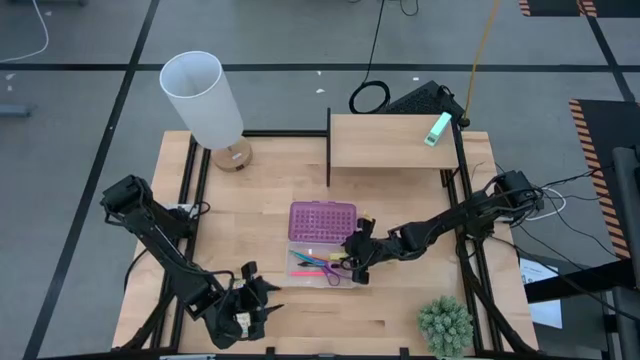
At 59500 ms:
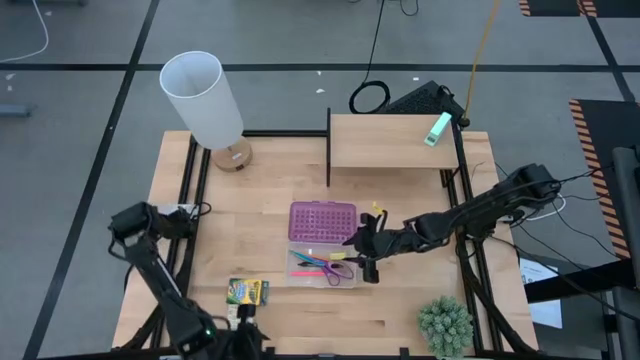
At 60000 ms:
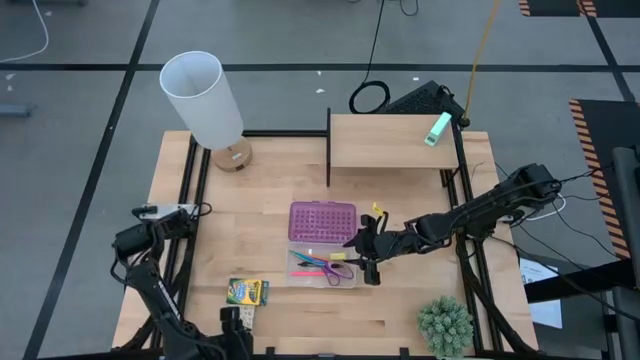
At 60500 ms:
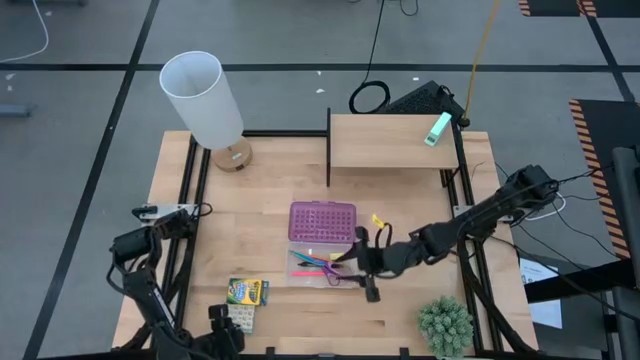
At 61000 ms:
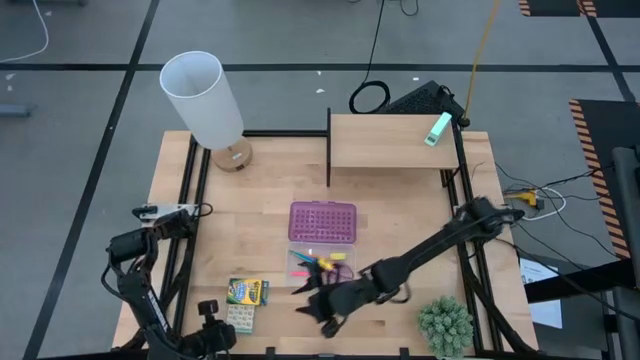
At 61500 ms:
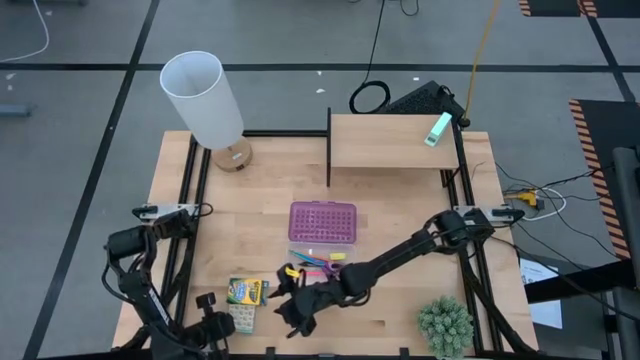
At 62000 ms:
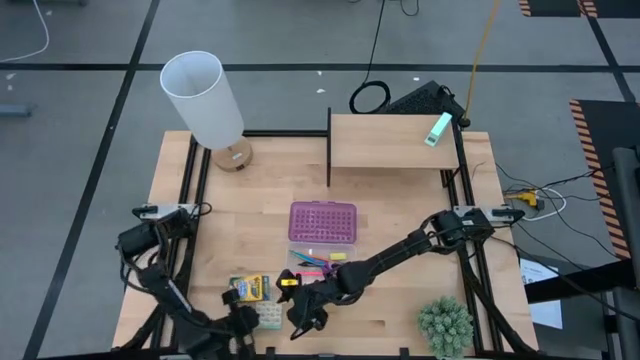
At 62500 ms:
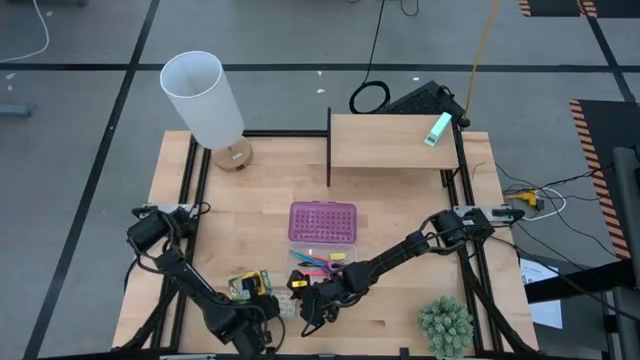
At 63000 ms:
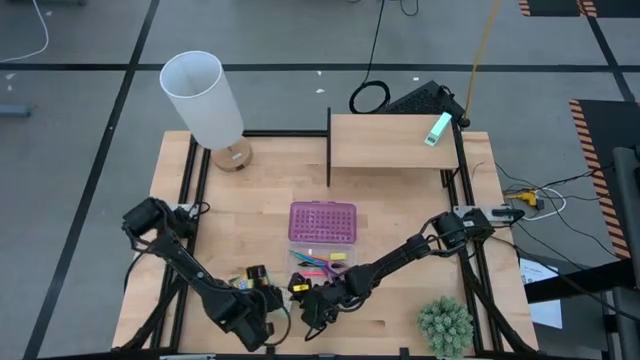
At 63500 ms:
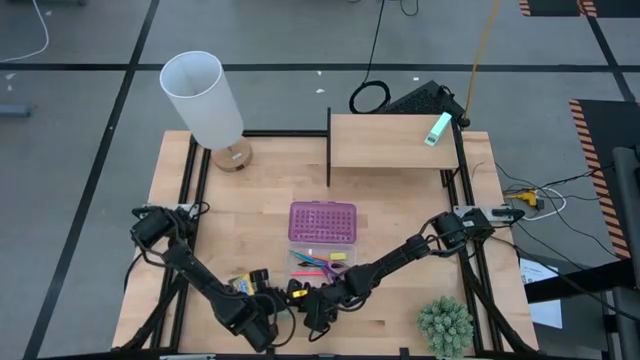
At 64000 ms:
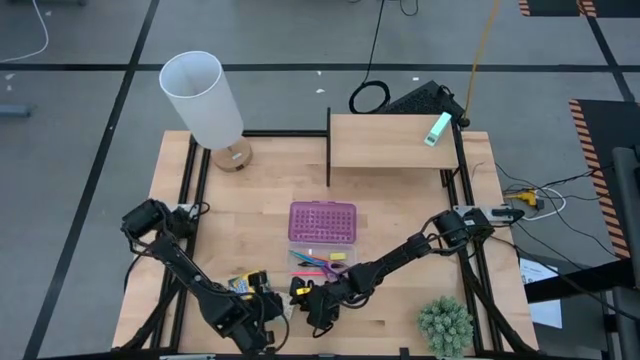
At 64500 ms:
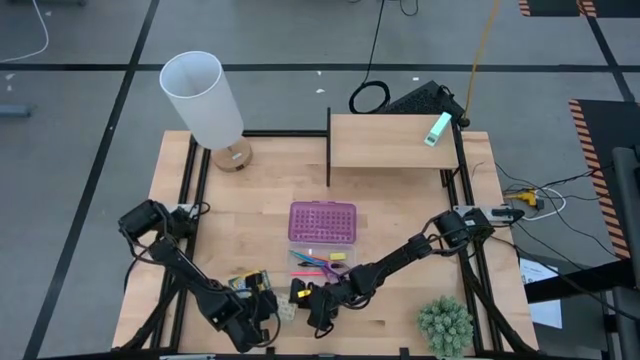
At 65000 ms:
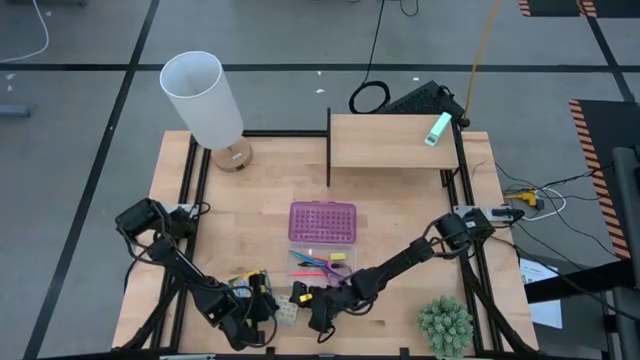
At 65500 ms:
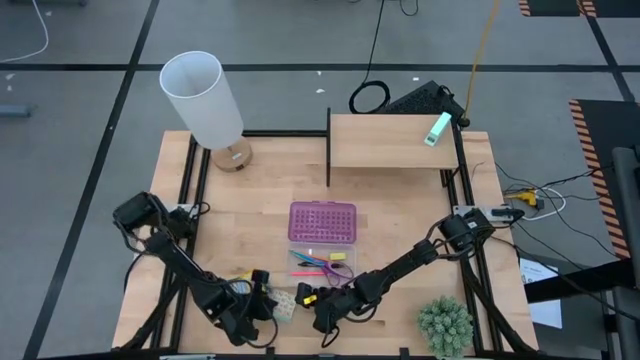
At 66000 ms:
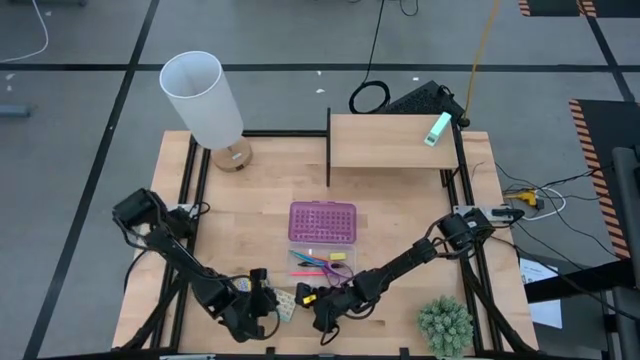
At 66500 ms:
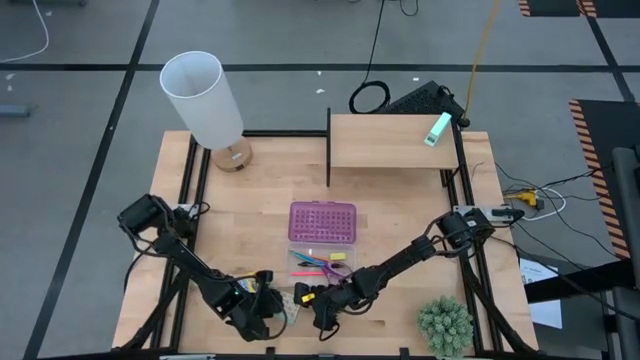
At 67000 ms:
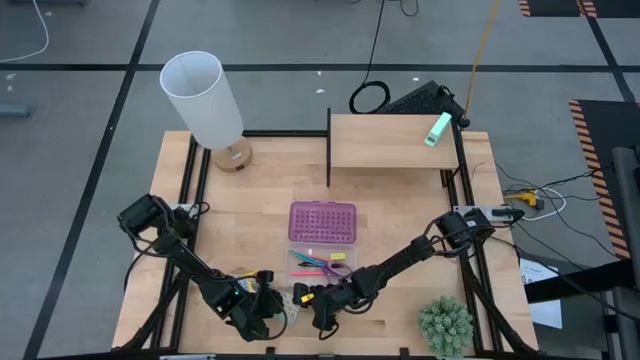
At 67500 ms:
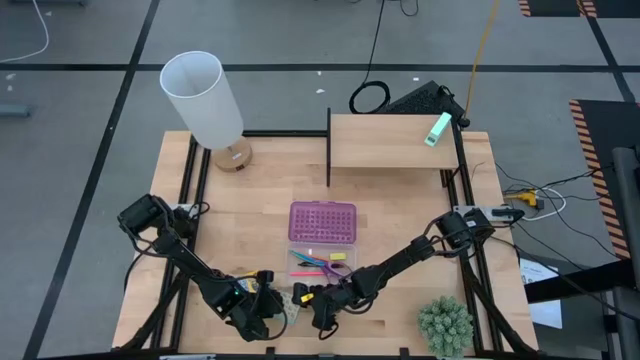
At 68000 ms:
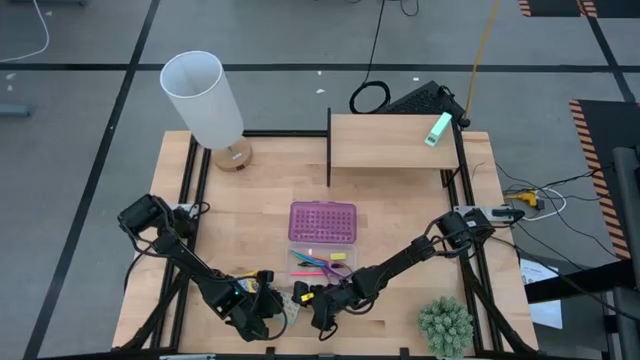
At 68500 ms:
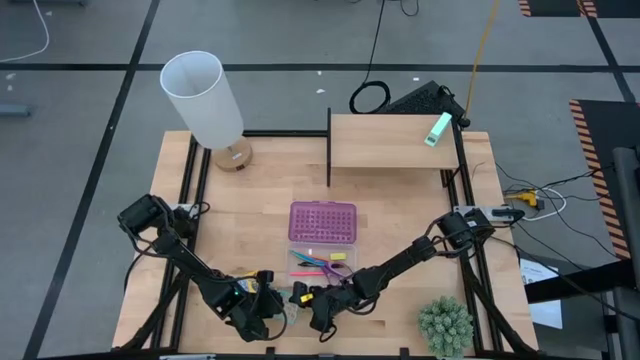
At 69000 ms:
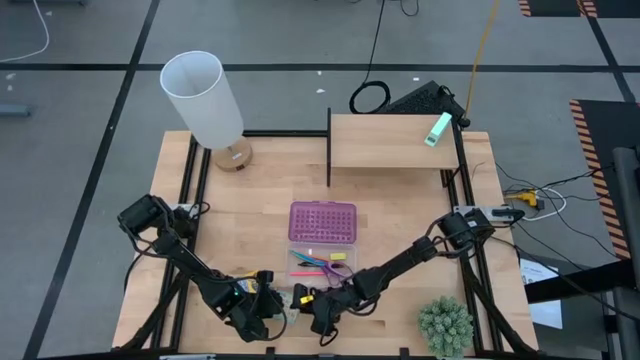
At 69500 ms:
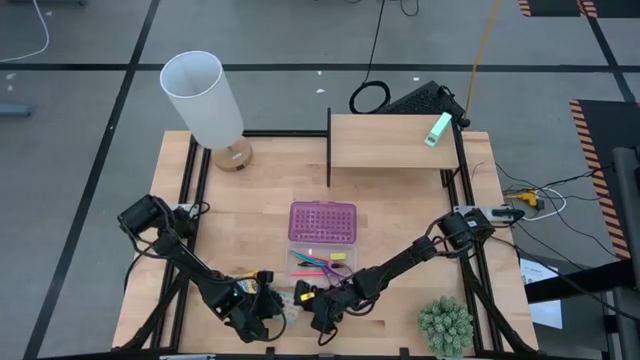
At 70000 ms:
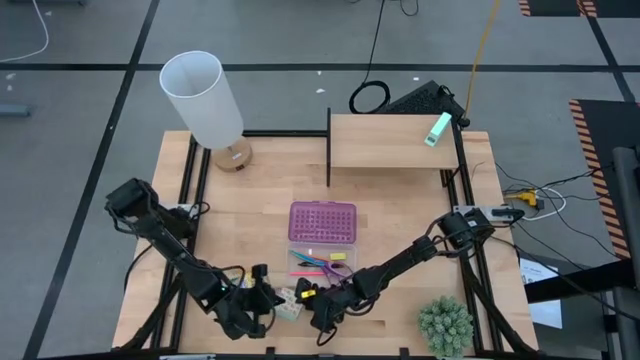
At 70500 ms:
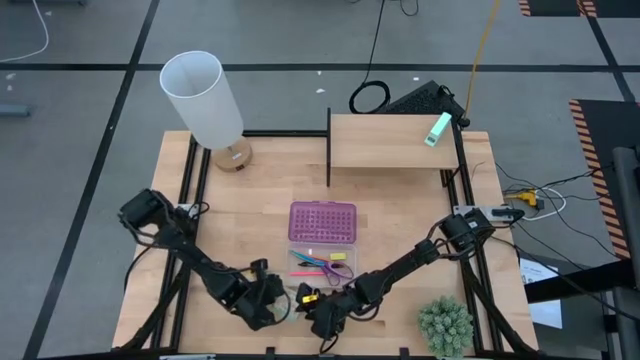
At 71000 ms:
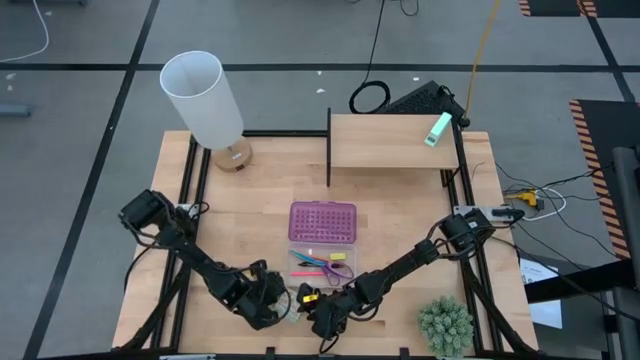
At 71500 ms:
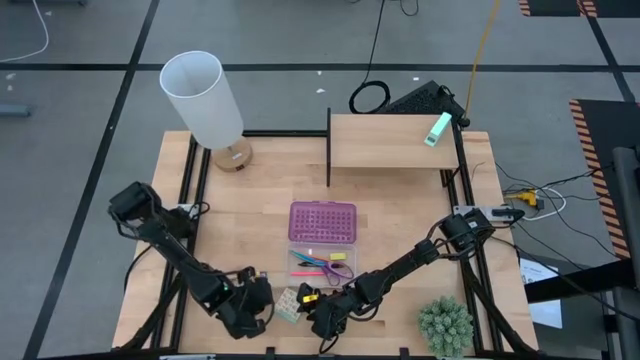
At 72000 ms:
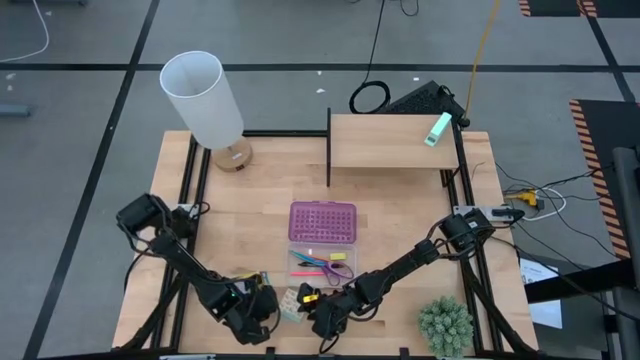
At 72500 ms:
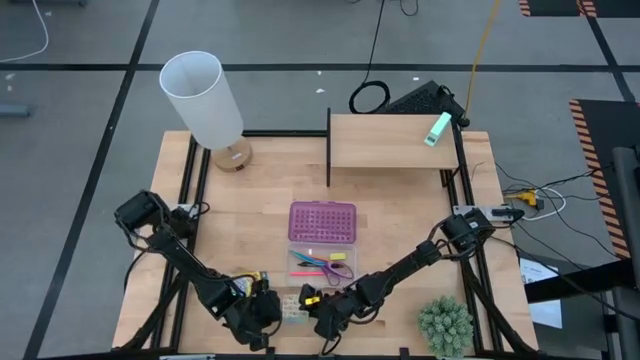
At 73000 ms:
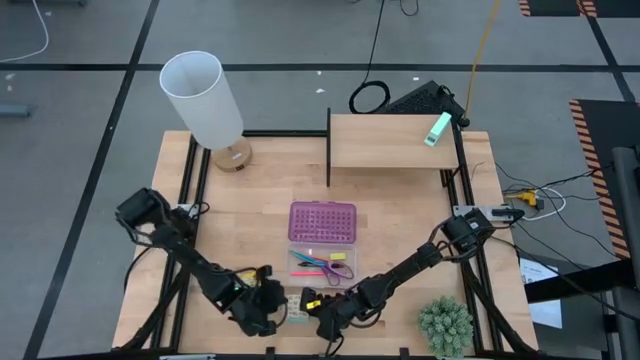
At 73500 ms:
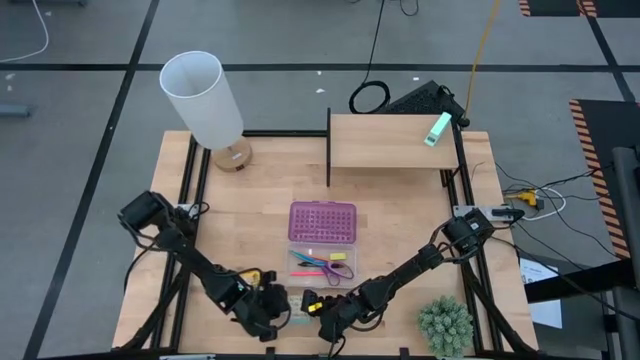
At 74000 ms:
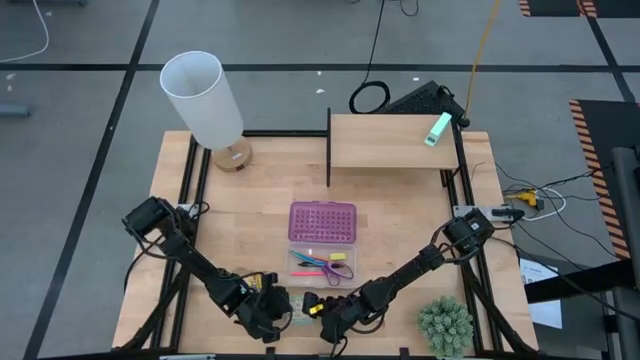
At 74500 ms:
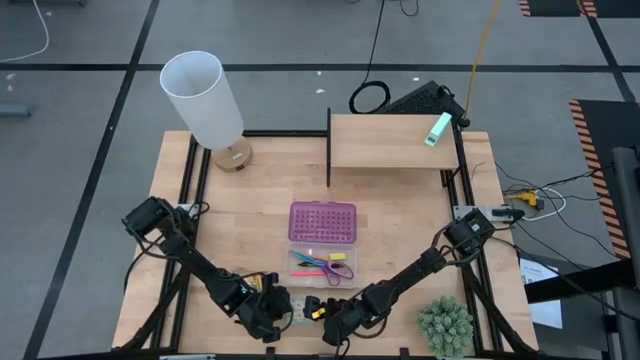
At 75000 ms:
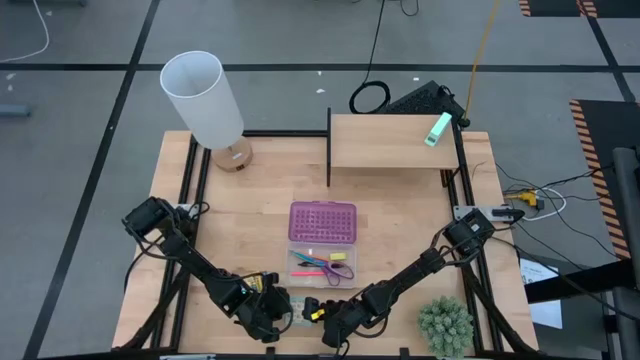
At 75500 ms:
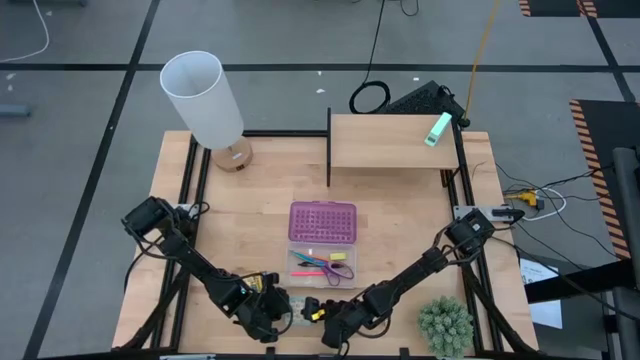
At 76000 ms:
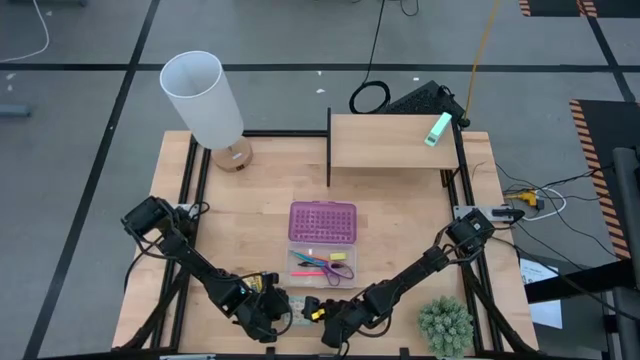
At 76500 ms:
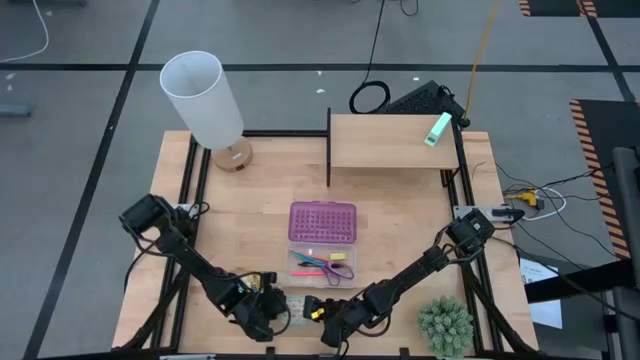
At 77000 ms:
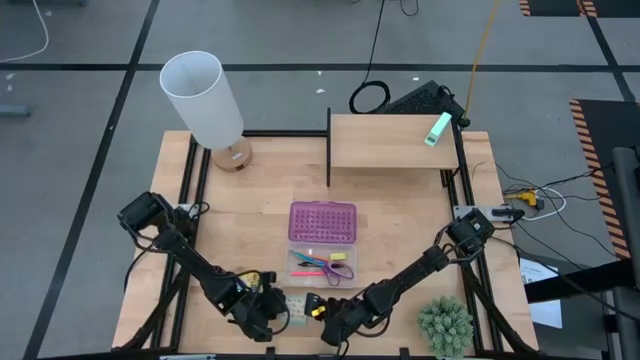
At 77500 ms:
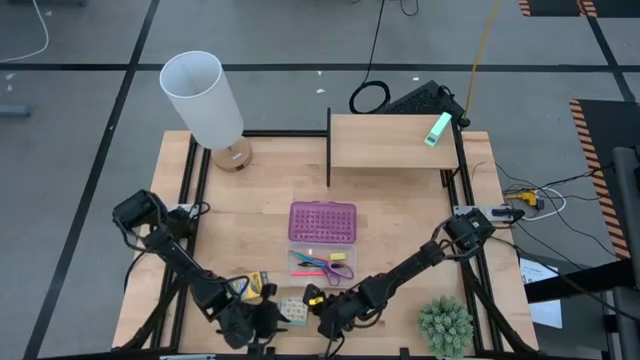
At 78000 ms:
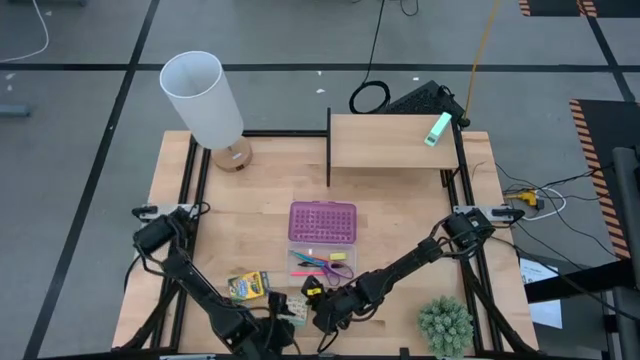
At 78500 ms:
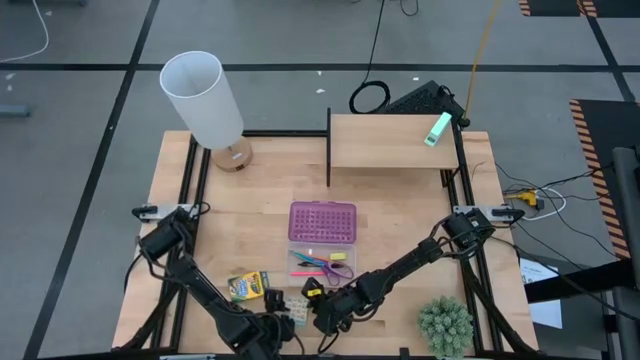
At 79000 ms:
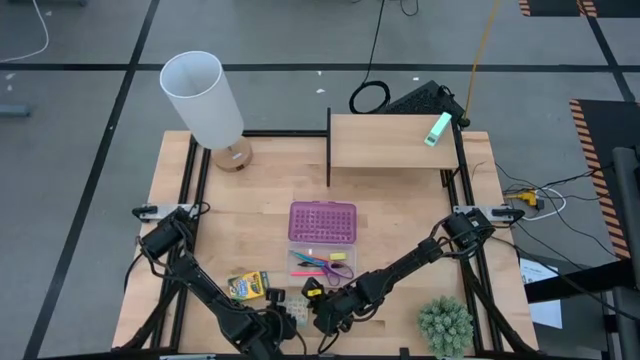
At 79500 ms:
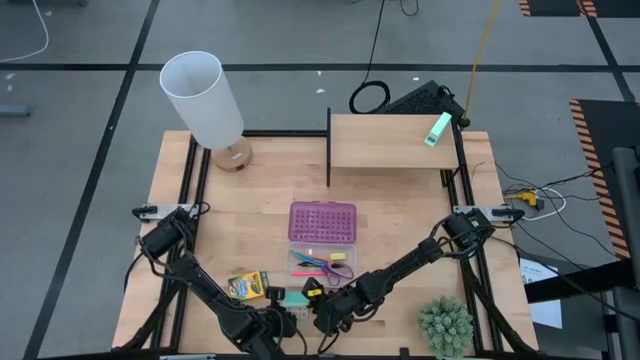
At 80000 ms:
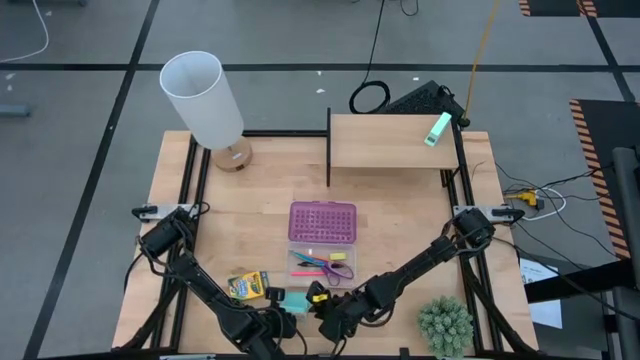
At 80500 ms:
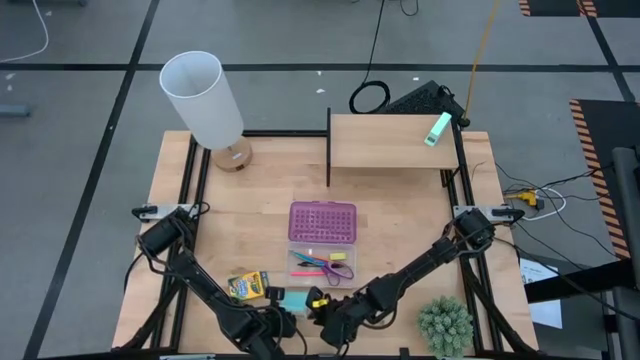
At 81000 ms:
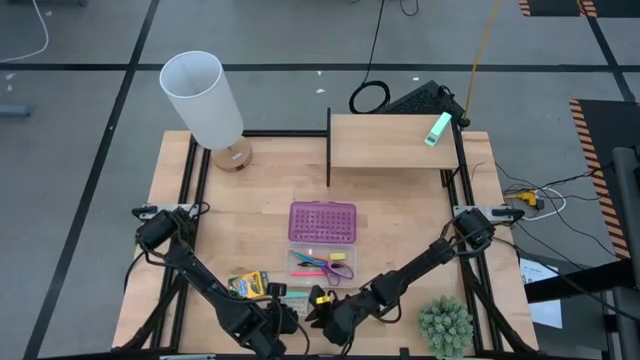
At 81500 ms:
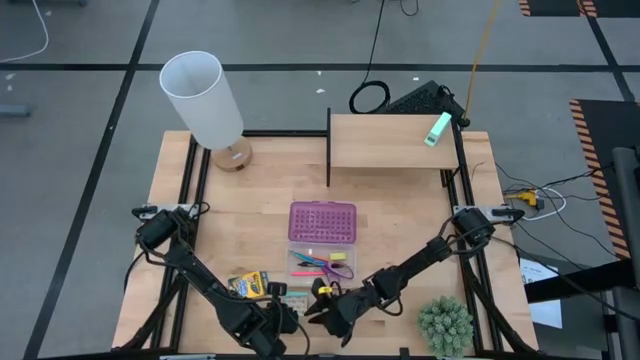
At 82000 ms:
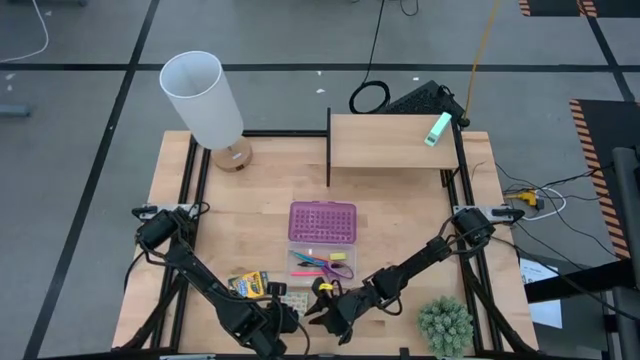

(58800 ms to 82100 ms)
Task: Pack school essentials
Put the green sticky notes into the violet plastic pencil case
